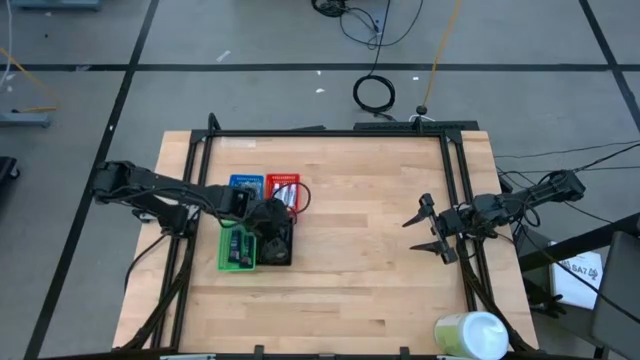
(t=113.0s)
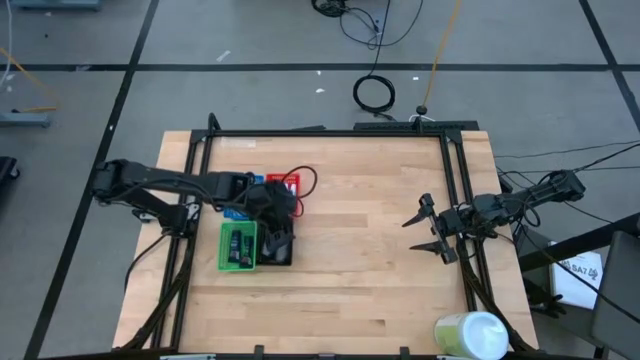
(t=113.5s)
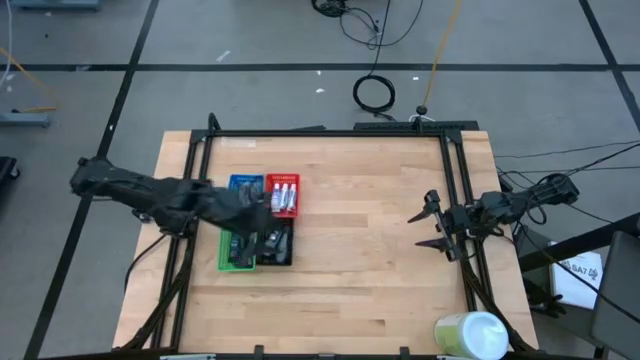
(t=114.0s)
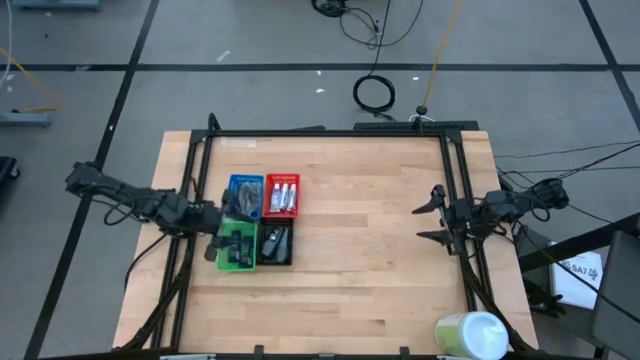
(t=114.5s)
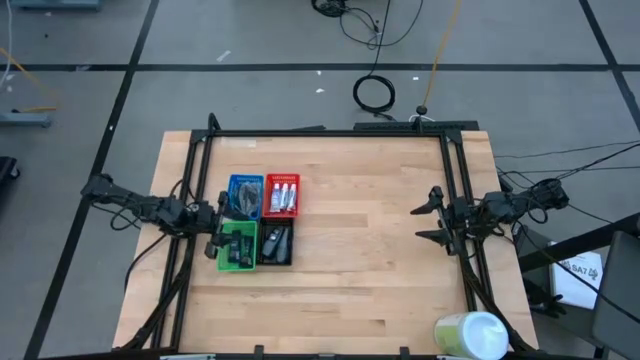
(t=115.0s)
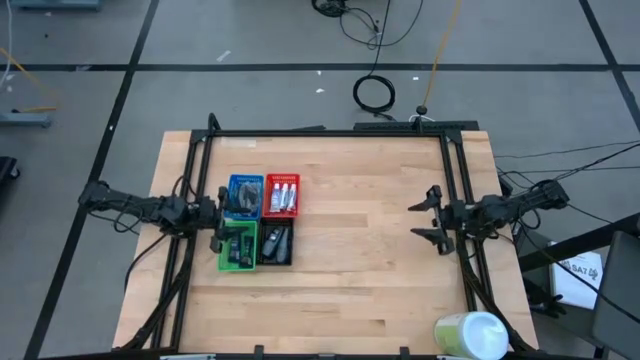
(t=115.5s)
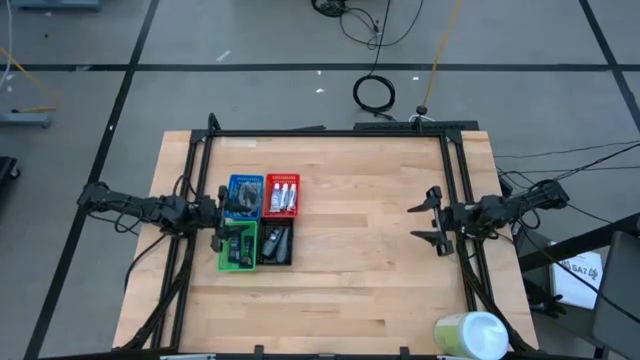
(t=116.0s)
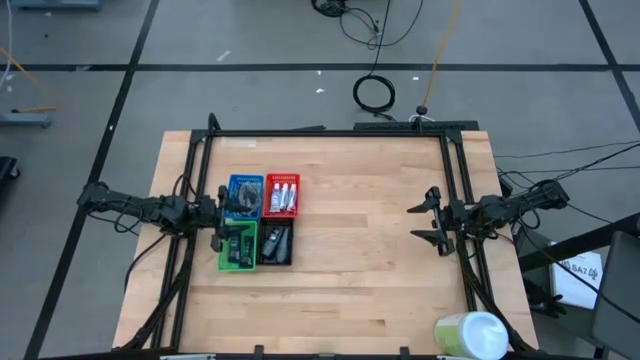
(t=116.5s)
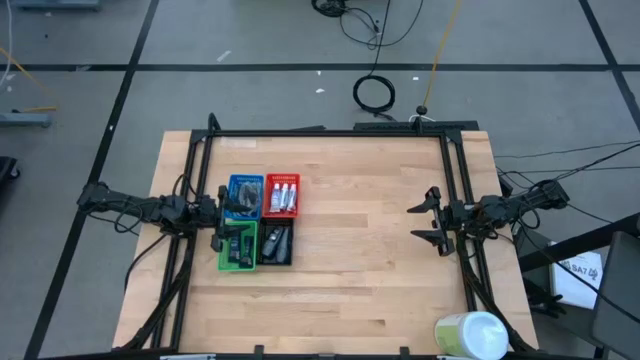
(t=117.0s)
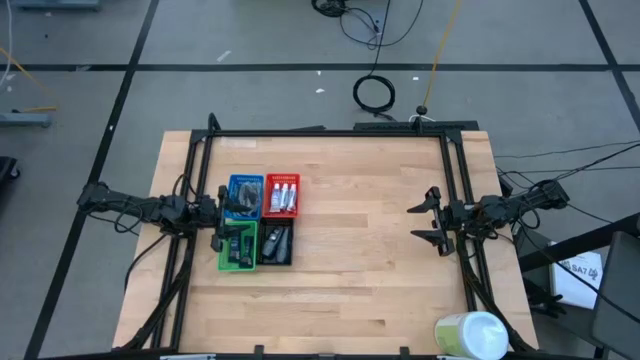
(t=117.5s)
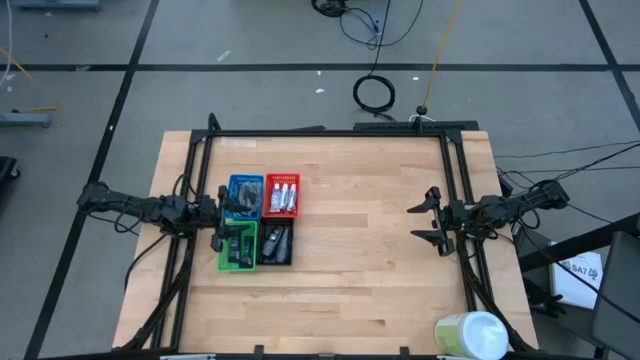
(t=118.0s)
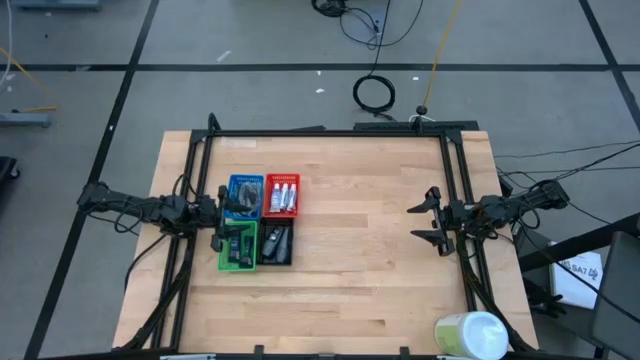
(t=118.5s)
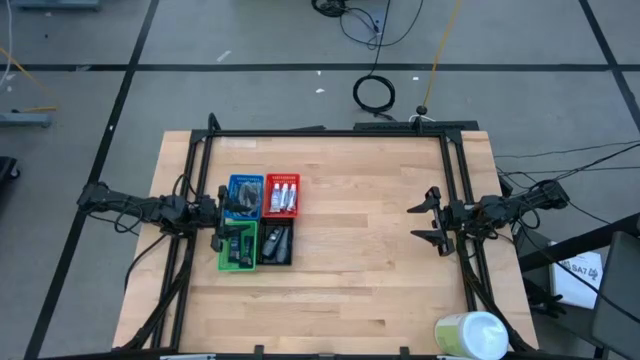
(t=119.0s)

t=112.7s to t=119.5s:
Task: Pick & Place Travel size toiletries
Return to Home Position

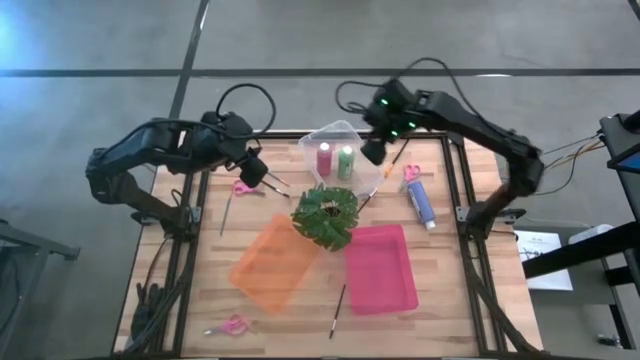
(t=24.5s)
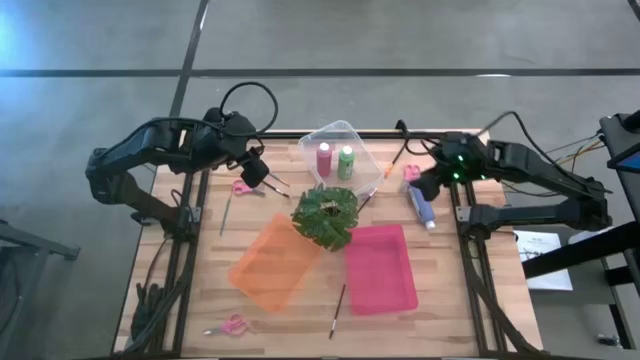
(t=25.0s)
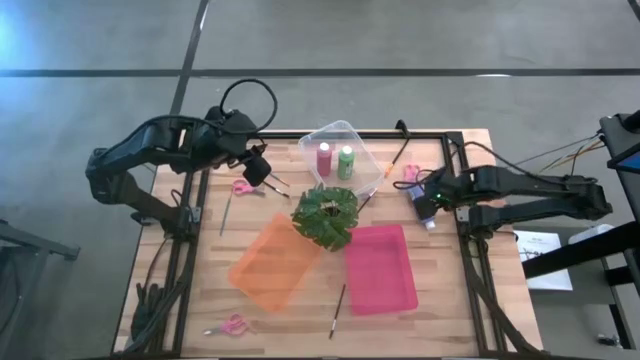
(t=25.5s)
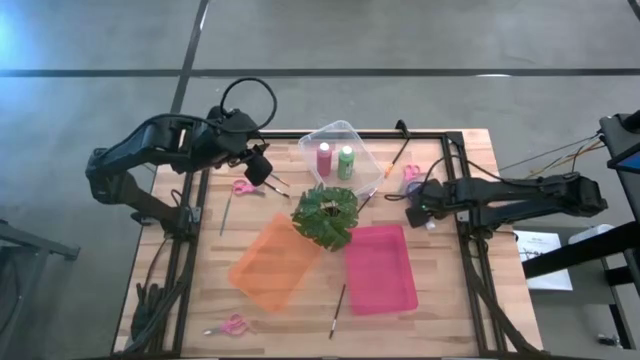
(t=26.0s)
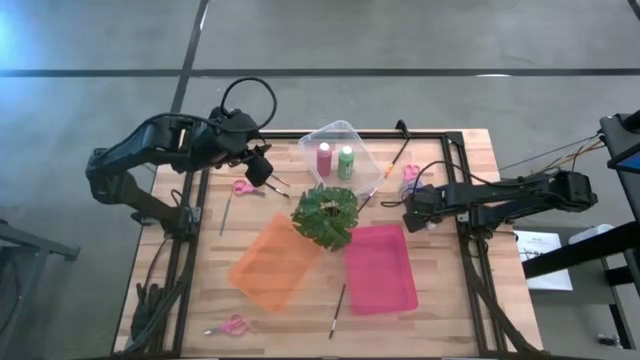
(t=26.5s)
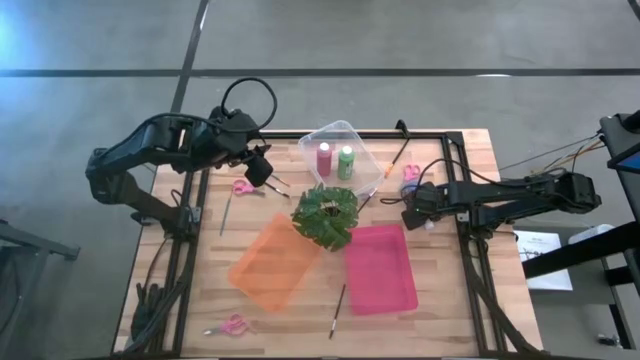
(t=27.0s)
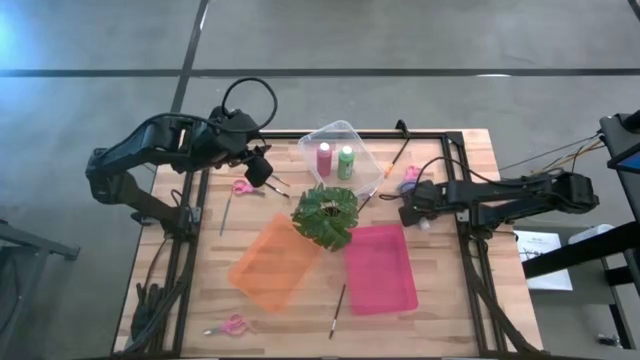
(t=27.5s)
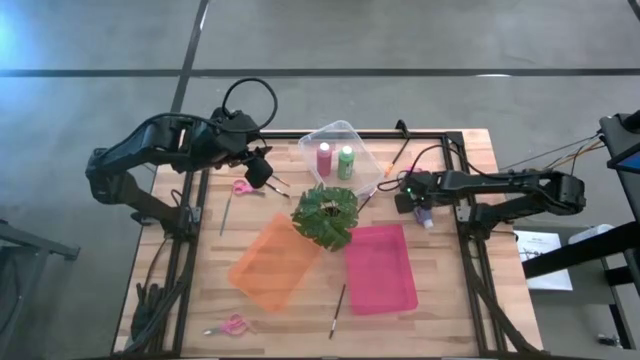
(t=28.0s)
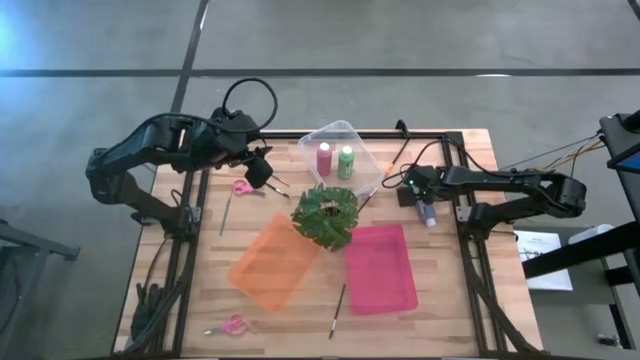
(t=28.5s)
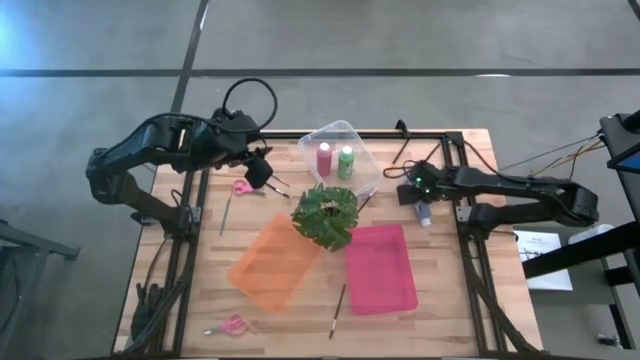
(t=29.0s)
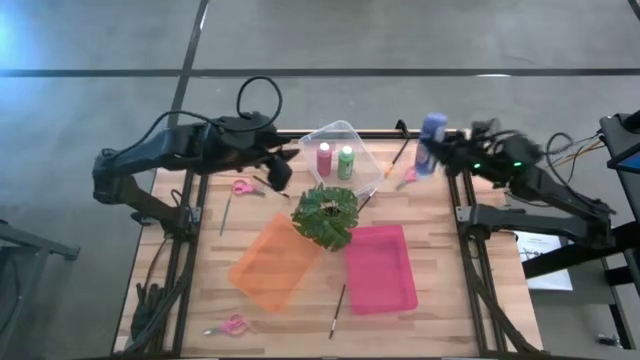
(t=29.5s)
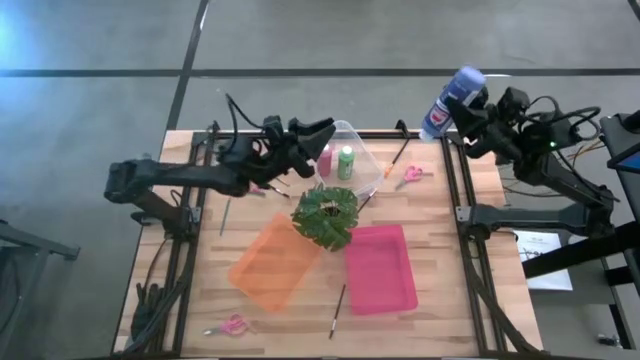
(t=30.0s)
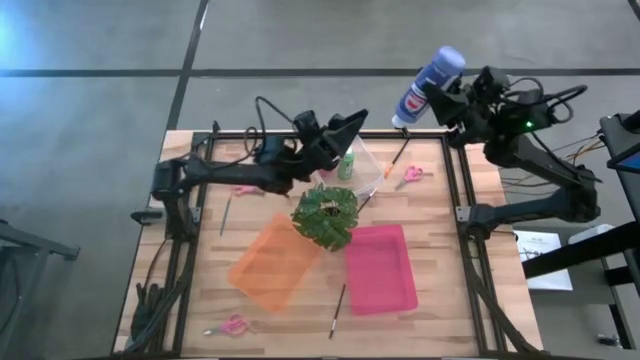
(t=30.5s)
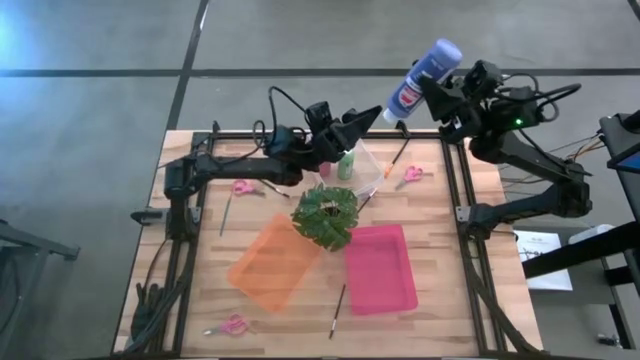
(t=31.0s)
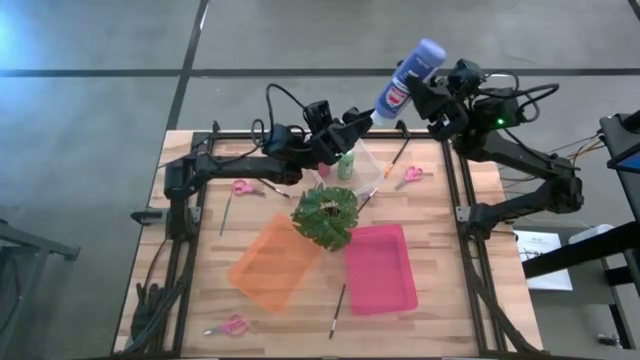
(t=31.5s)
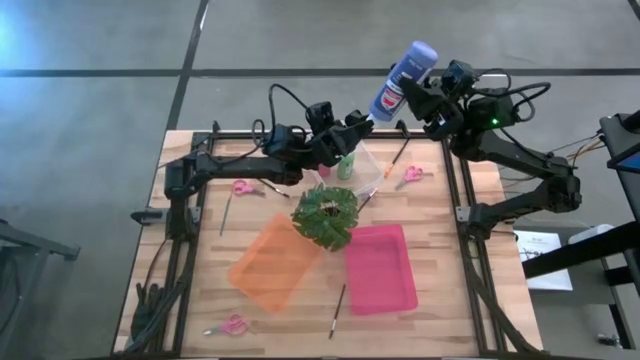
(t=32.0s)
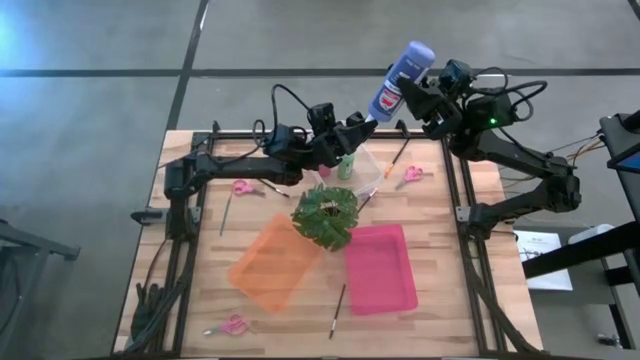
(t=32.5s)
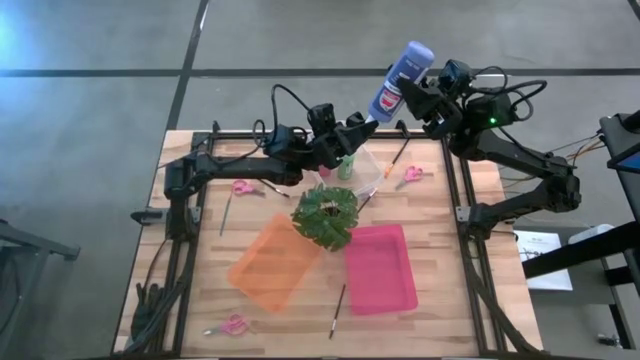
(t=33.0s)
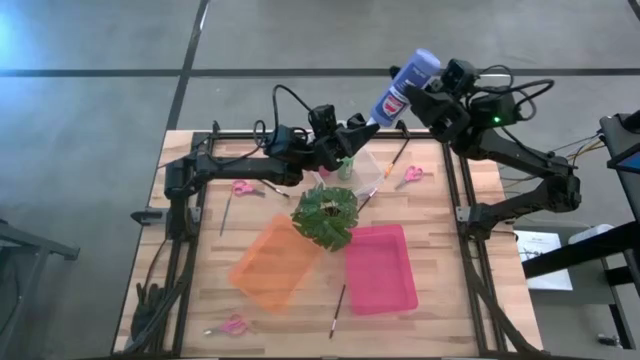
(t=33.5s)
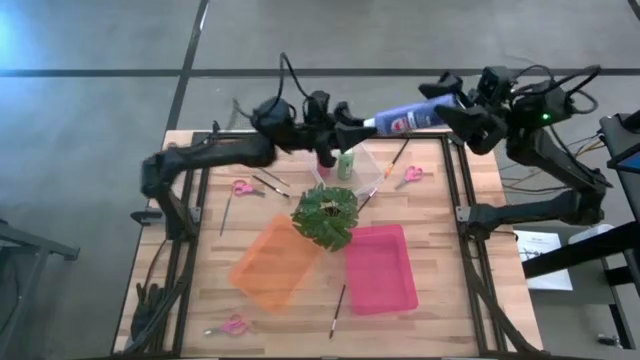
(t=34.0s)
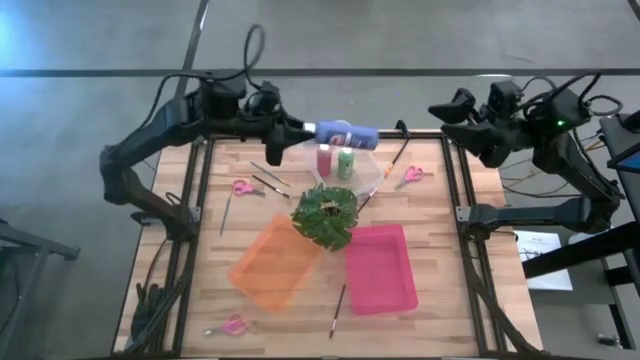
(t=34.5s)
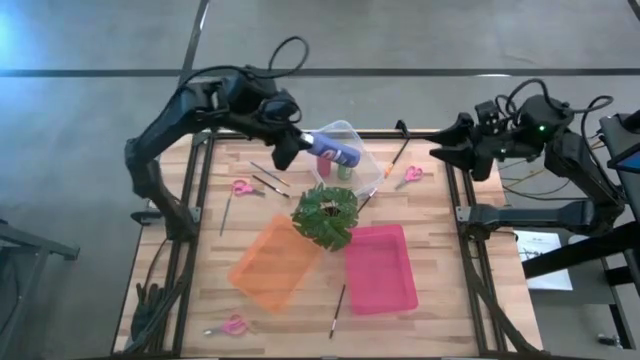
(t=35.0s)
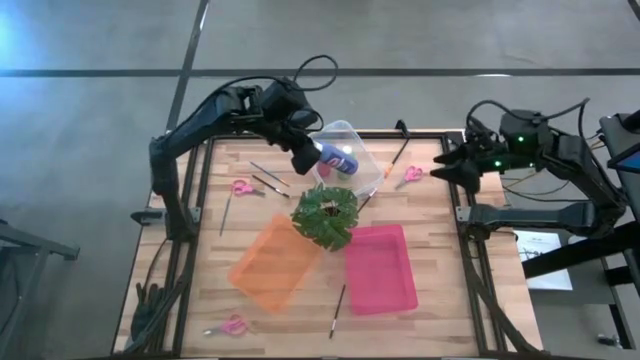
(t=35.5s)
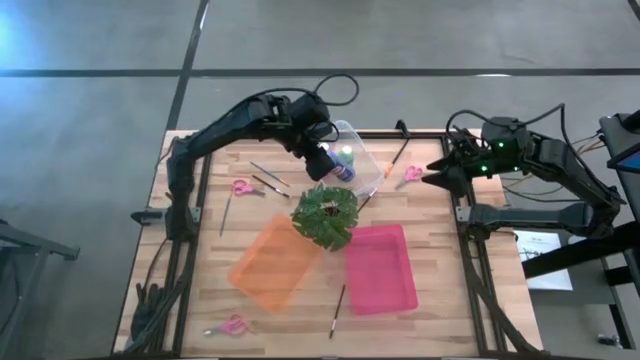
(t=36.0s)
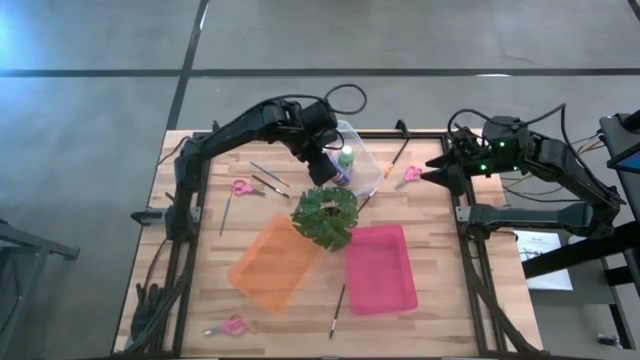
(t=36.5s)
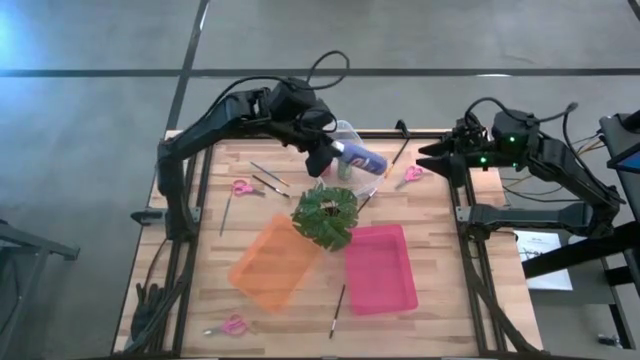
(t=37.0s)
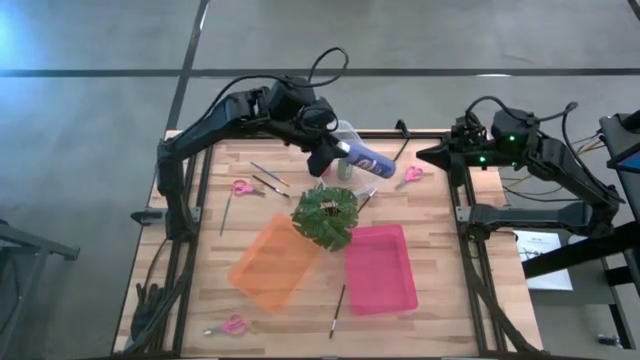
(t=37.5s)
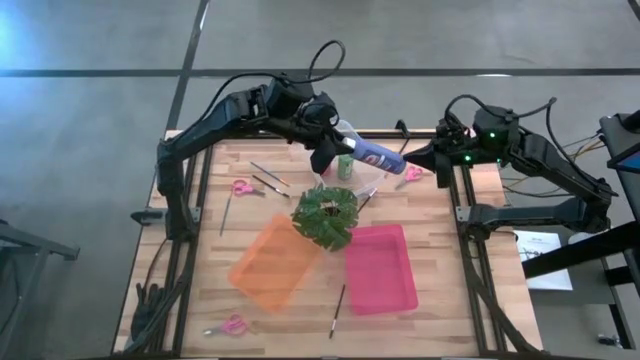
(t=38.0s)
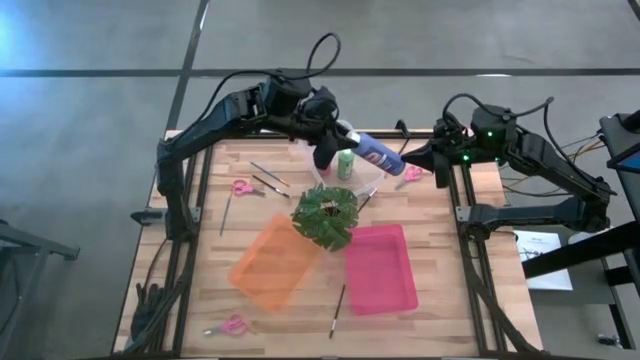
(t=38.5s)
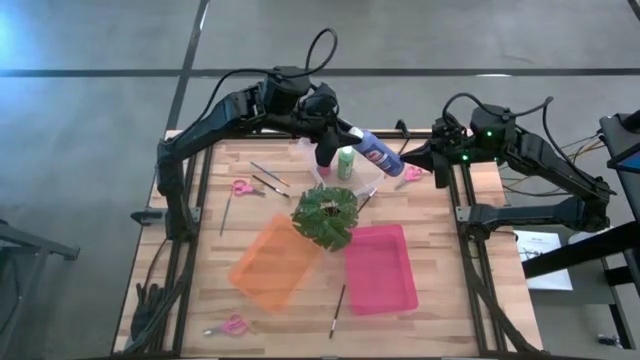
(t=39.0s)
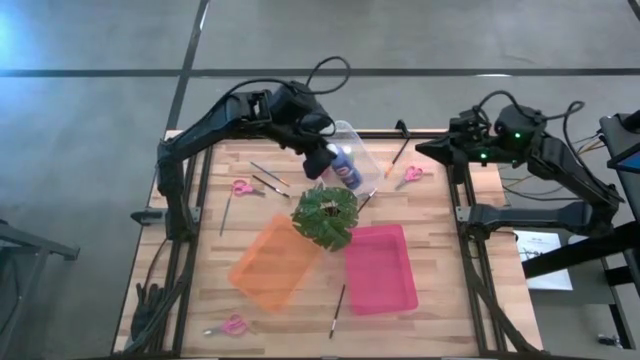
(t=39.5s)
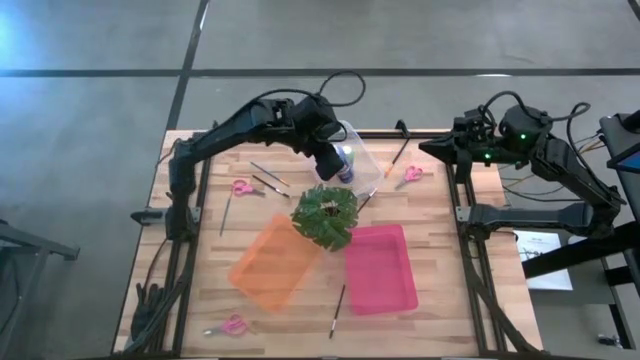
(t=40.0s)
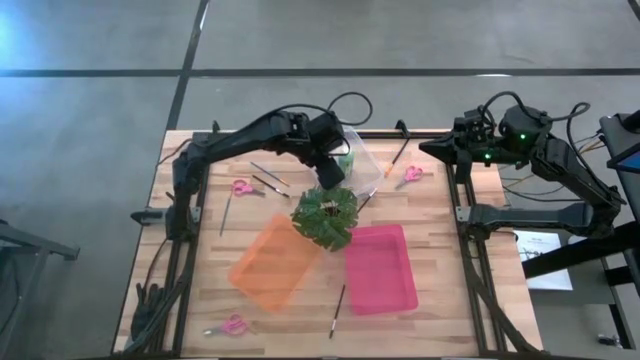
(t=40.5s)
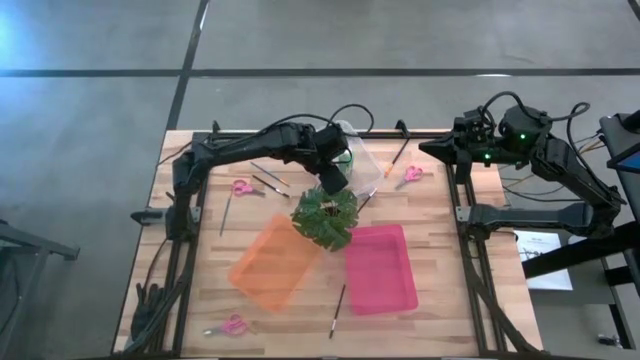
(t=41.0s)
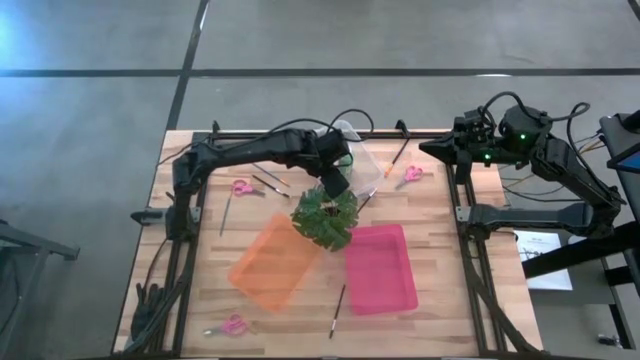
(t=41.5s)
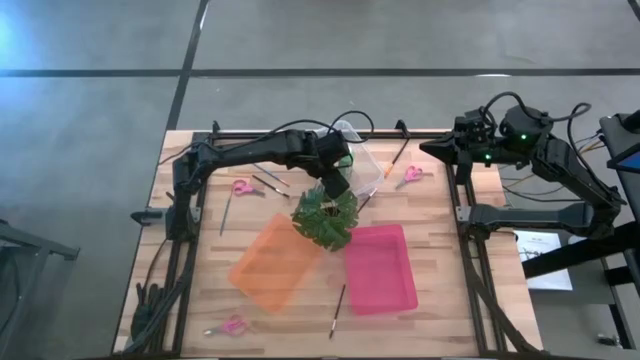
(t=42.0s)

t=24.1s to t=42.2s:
Task: Pick & Place Paint Supplies
Put the blue acrylic craft paint bottle into the transparent bin
